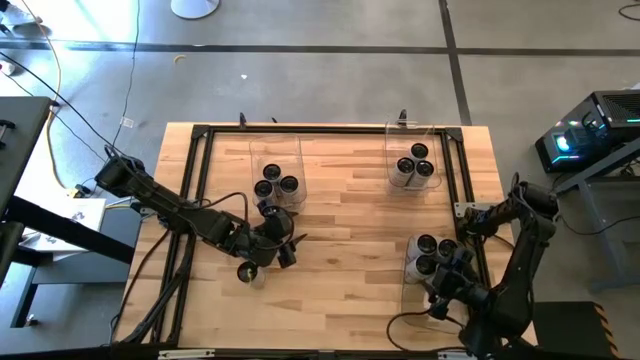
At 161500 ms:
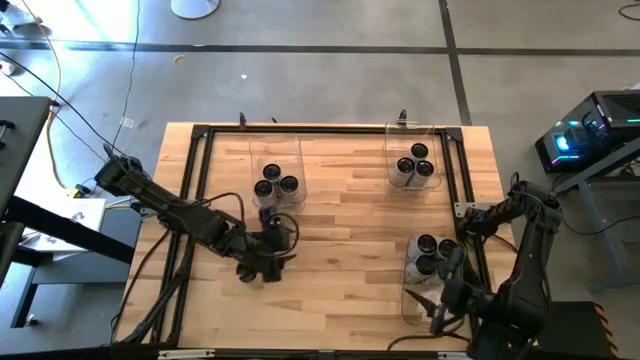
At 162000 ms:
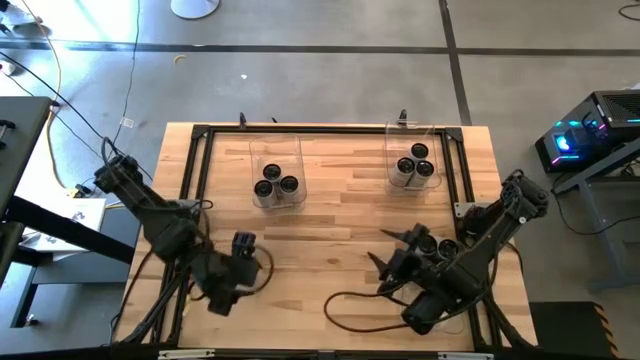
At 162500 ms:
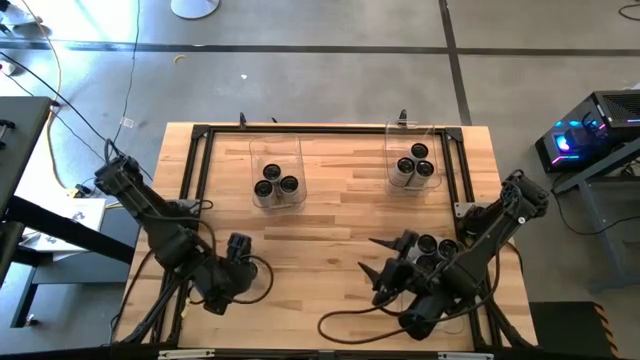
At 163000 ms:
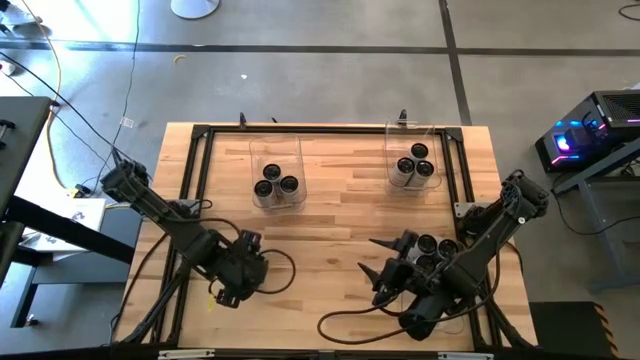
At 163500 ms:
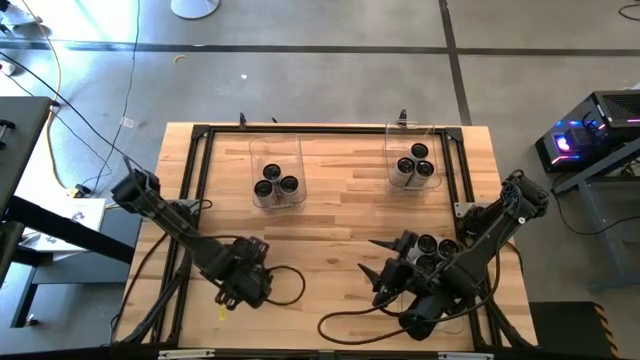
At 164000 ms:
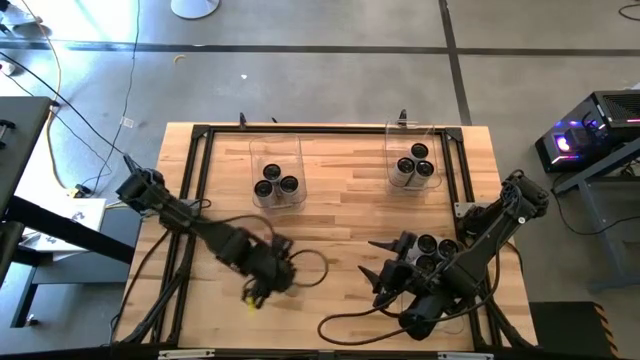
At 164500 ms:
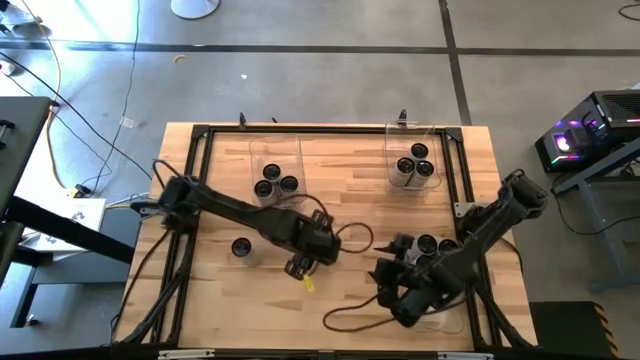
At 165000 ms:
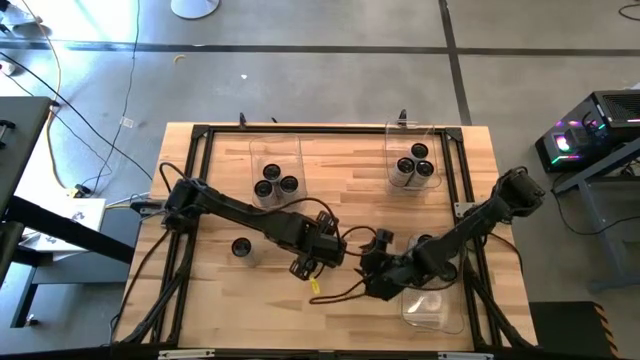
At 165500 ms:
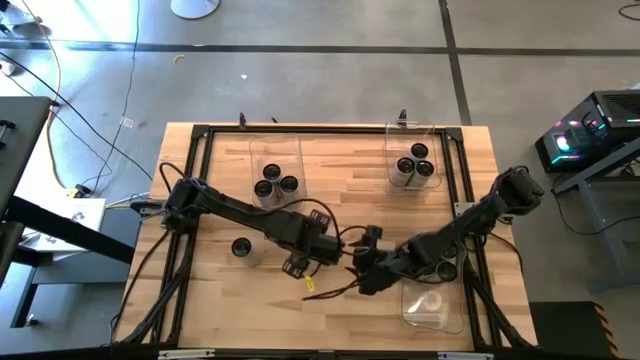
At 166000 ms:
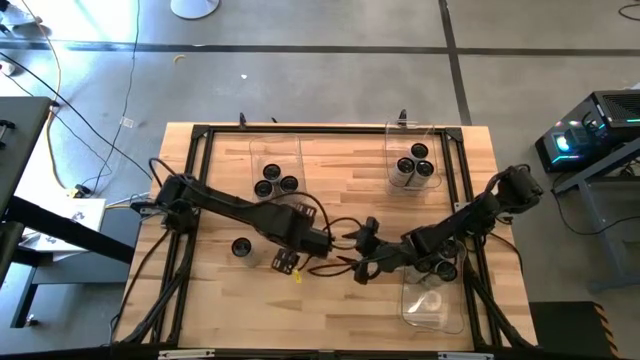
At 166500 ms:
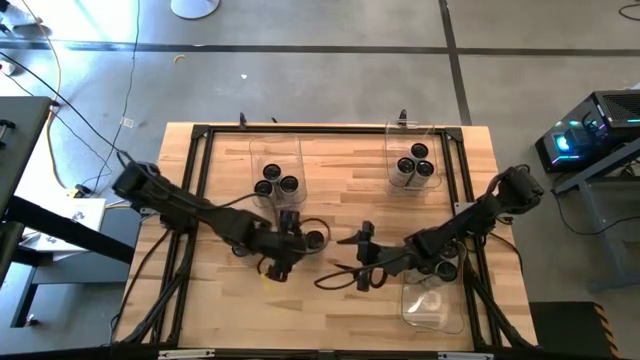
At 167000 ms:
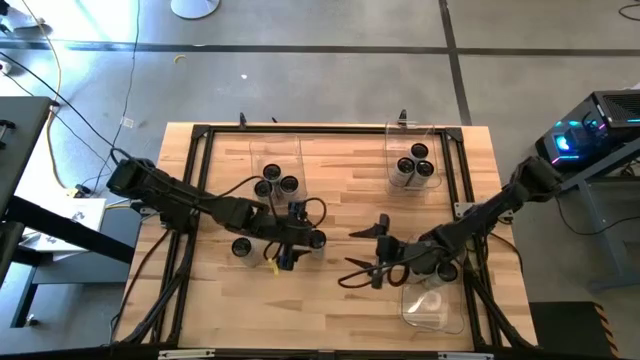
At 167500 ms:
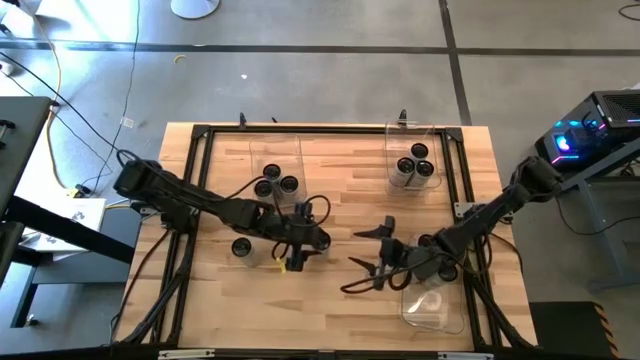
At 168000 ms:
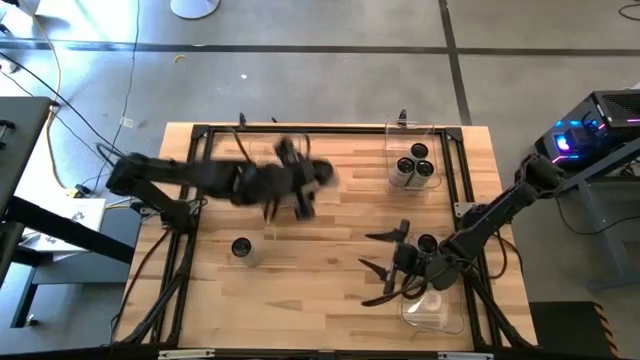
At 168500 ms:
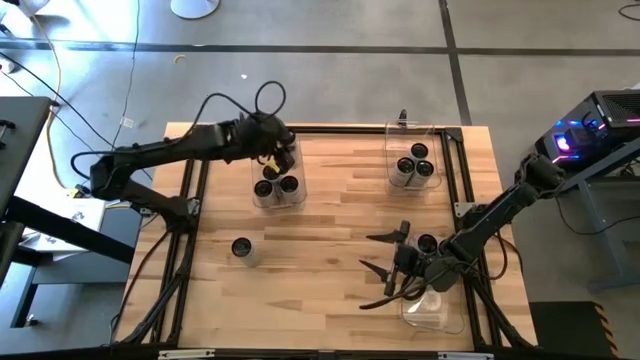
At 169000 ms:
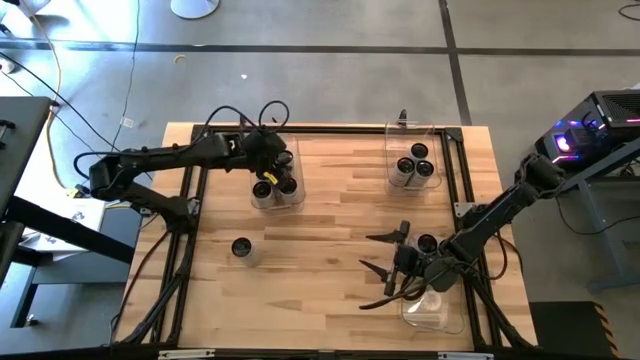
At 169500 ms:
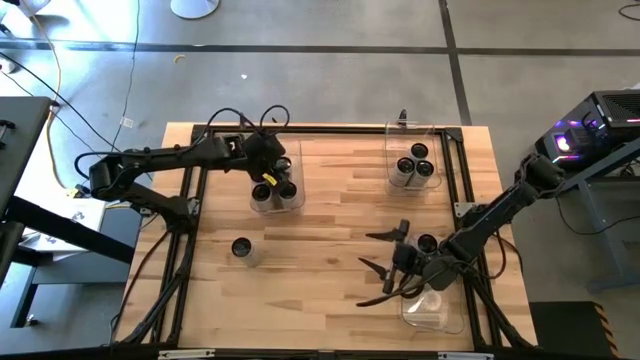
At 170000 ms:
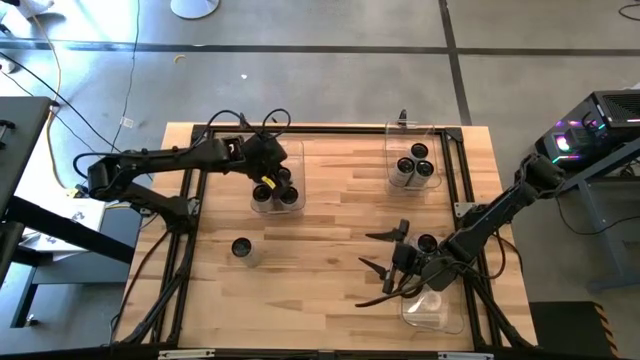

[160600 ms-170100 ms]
Task: Sort soda cans
Put the white-pink soda can into the top left transparent bin

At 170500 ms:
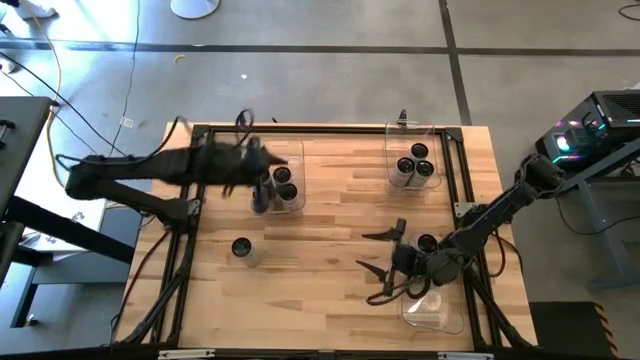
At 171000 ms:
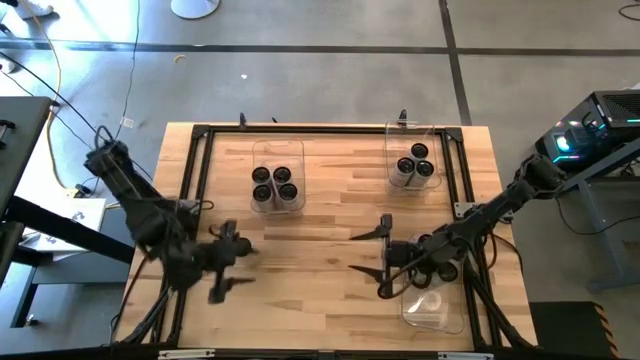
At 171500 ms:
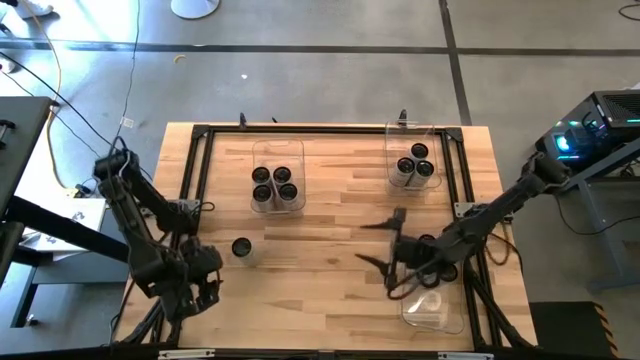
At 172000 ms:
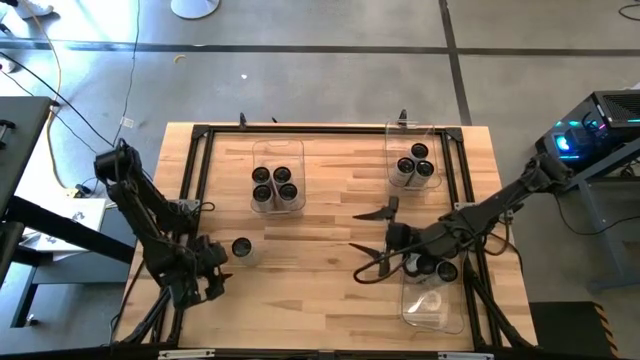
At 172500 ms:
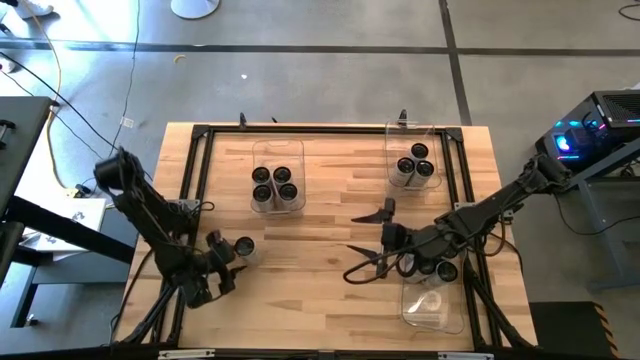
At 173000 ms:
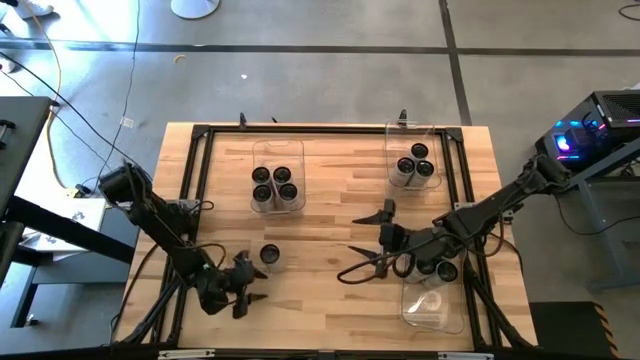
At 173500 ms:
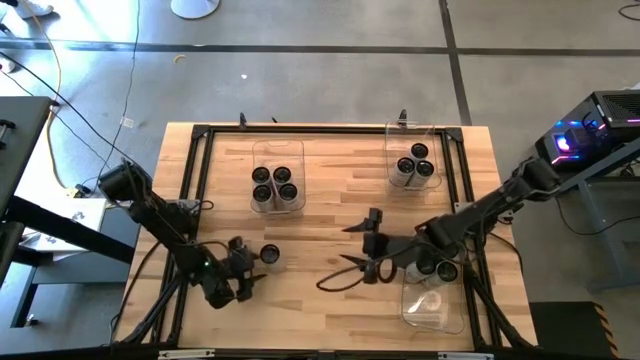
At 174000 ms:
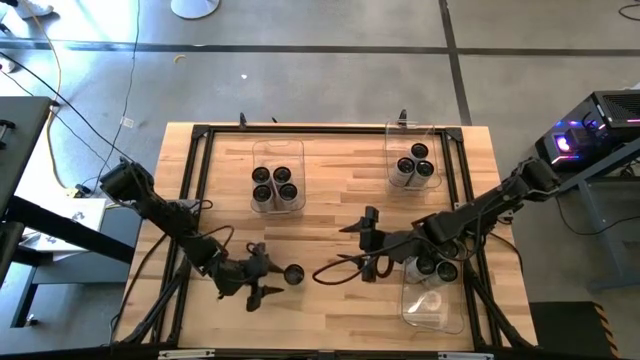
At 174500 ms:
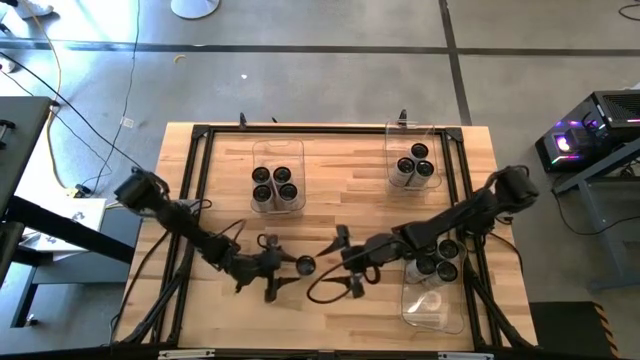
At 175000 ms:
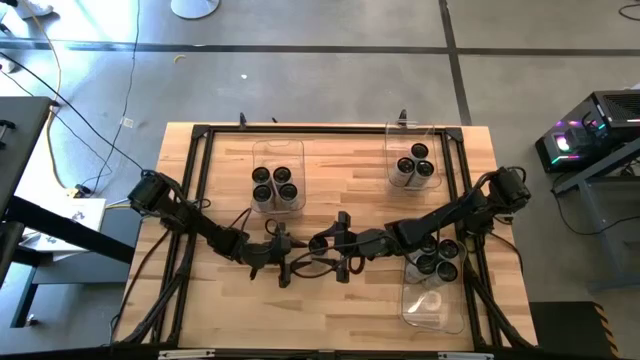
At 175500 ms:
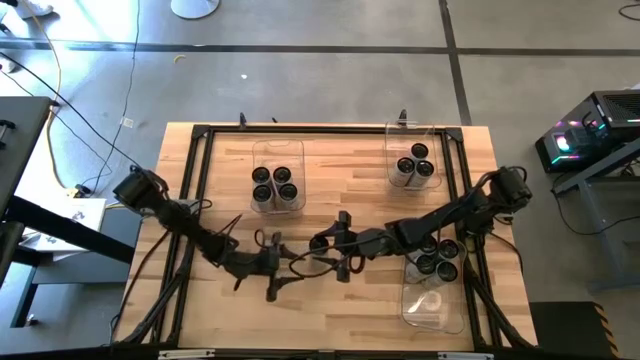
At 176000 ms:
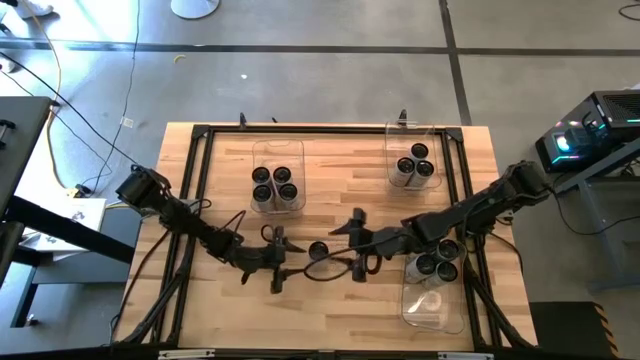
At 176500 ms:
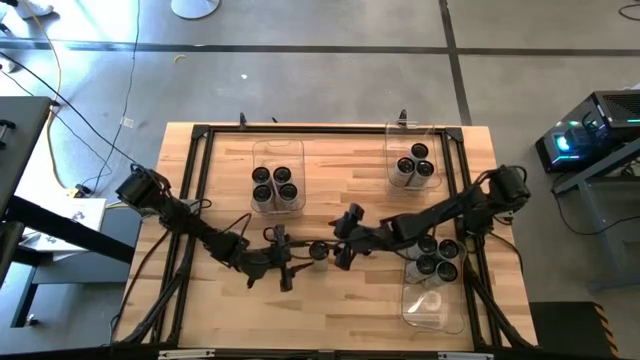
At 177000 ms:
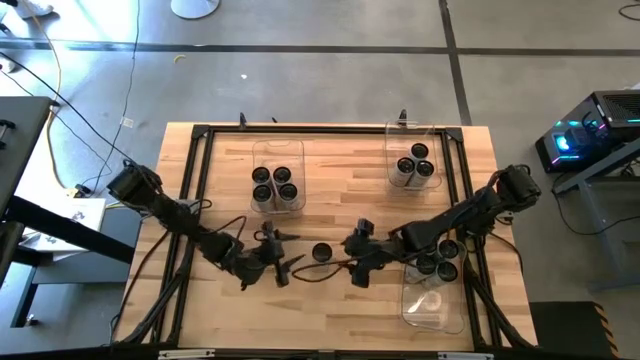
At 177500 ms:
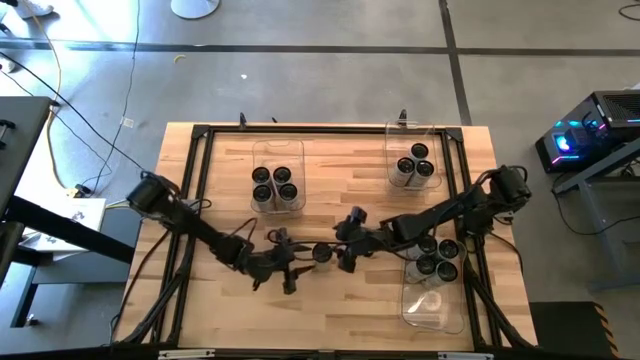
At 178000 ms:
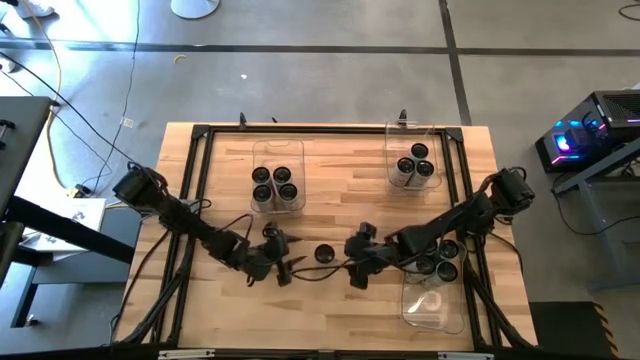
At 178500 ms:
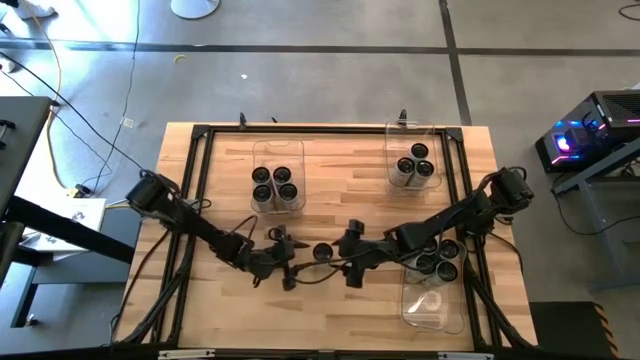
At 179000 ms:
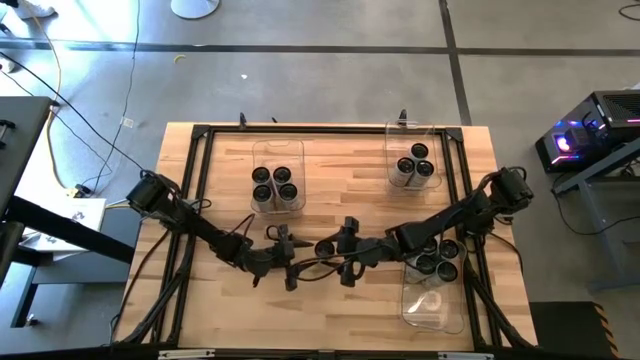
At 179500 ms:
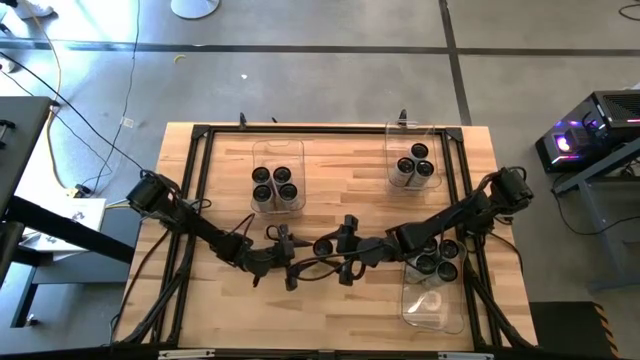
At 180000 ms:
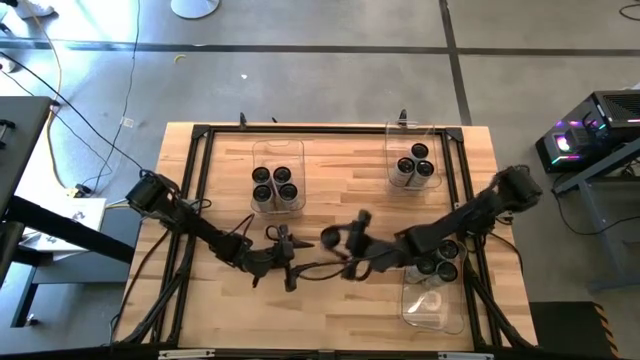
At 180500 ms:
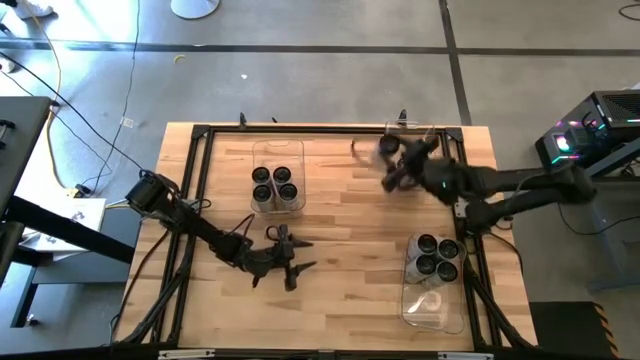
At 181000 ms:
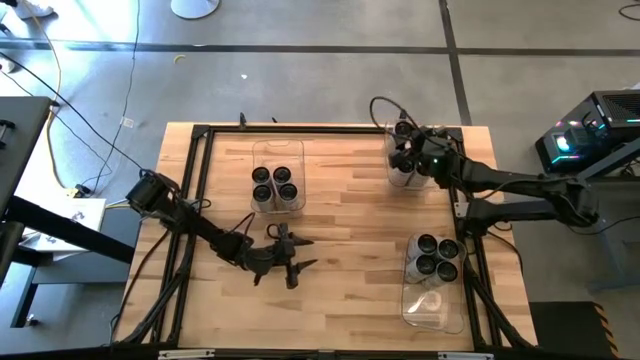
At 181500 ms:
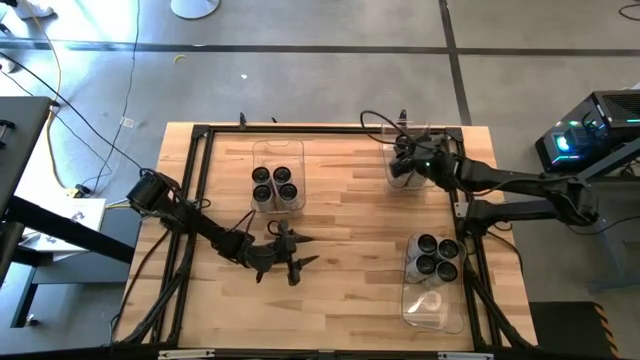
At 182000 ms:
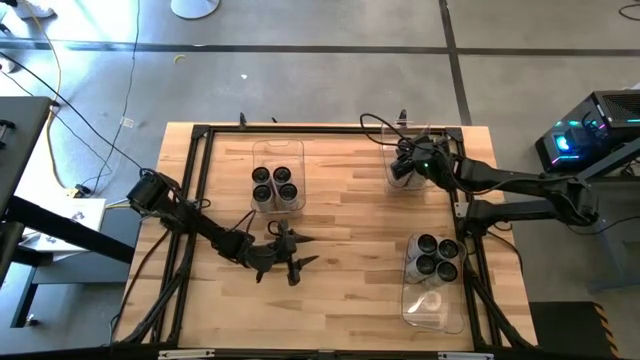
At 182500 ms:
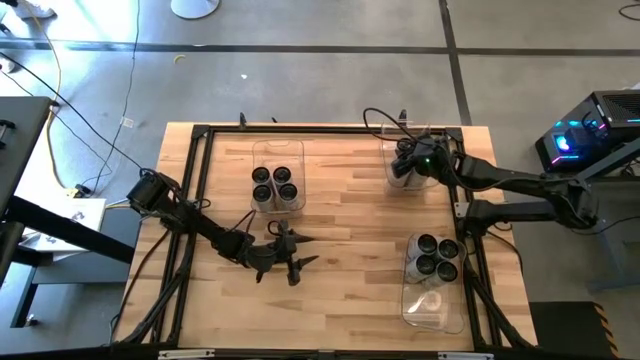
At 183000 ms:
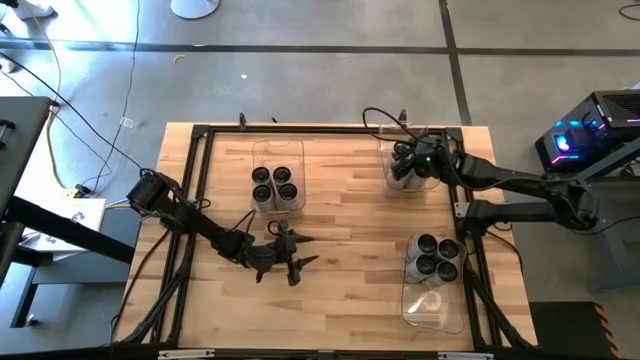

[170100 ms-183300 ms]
Put the white-yellow soda can into the top right transparent bin

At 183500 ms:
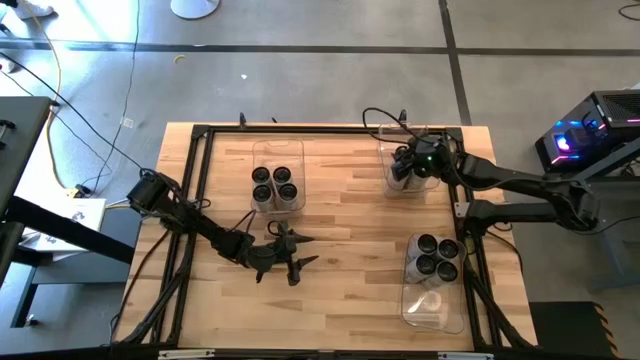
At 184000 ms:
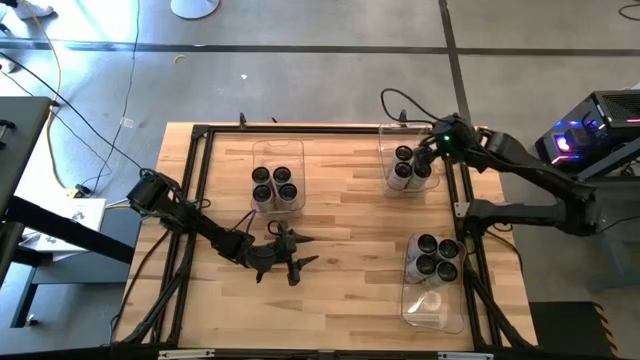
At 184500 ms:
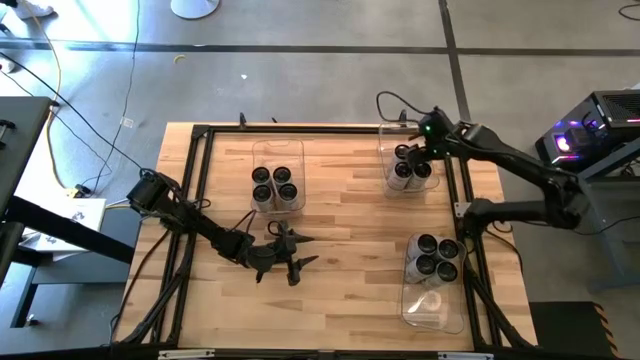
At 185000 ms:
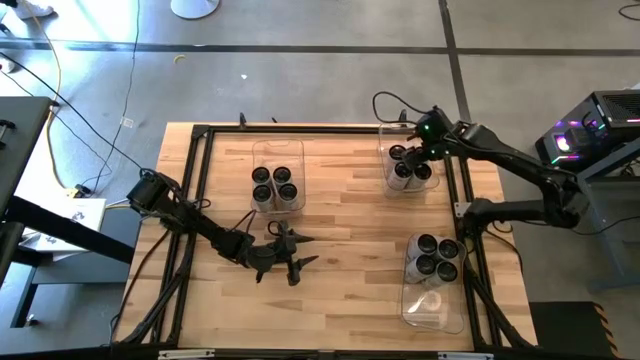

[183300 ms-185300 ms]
Adjust the white-yellow soda can
